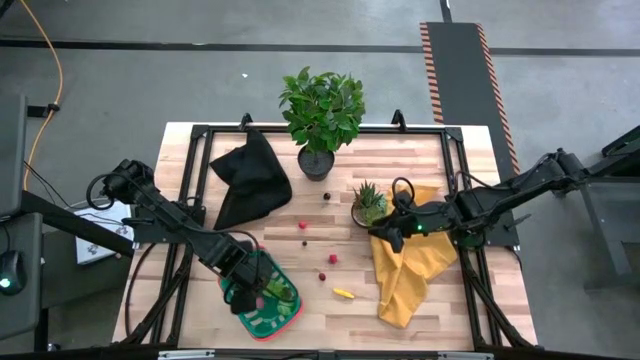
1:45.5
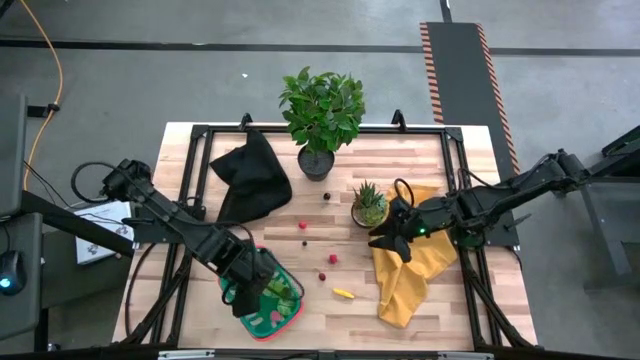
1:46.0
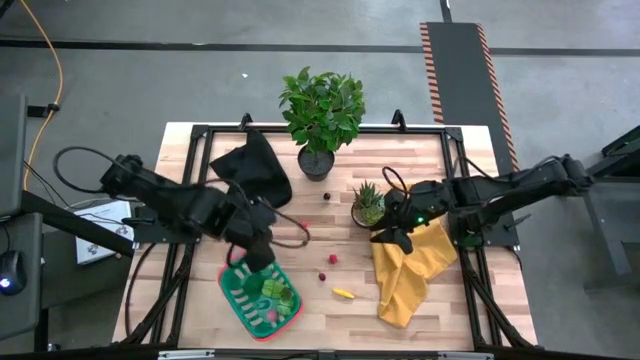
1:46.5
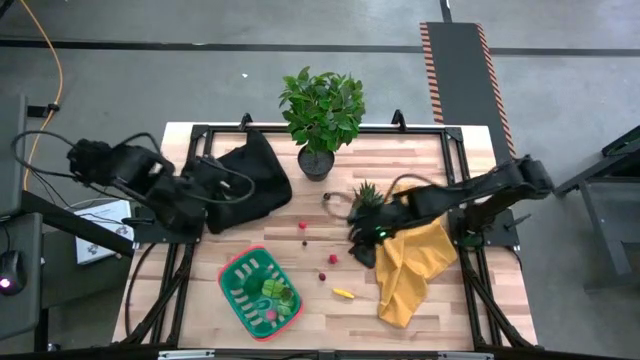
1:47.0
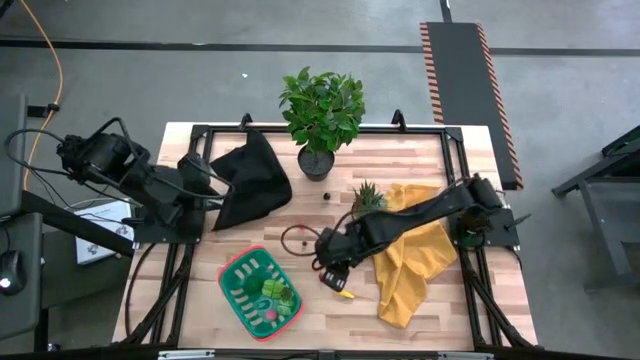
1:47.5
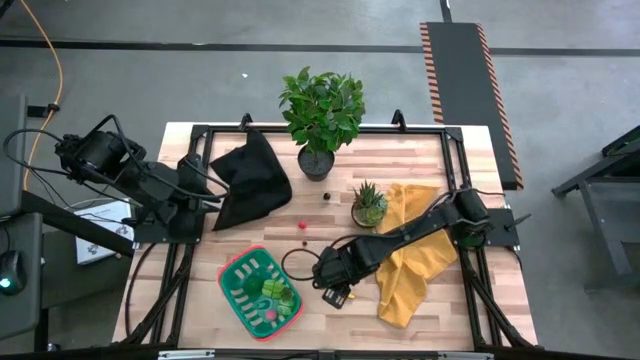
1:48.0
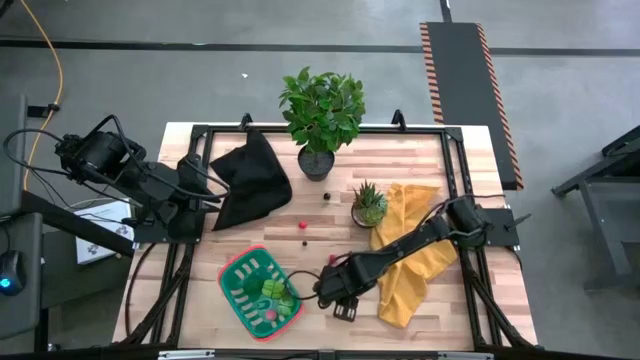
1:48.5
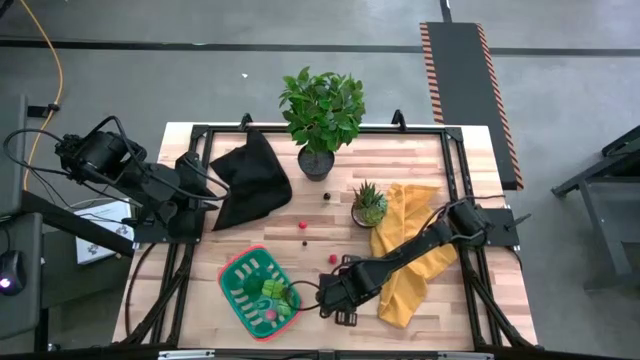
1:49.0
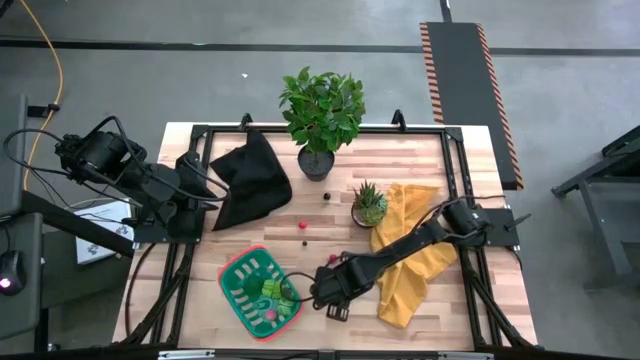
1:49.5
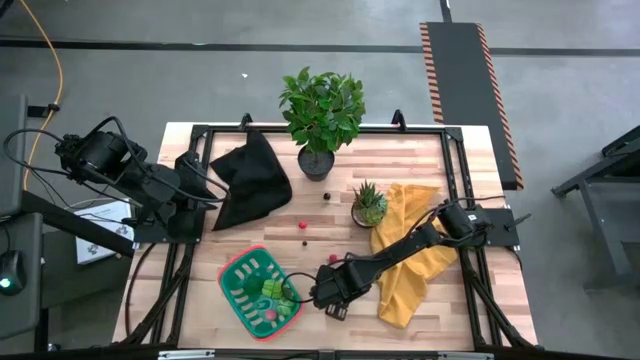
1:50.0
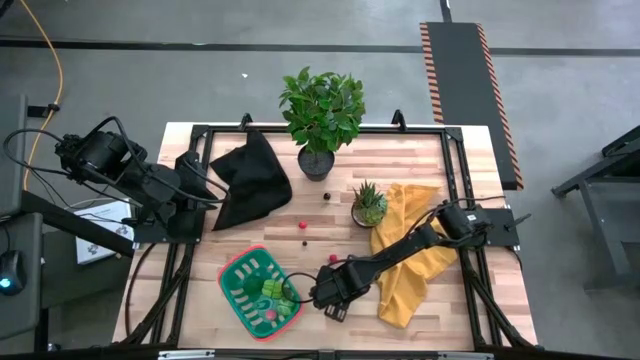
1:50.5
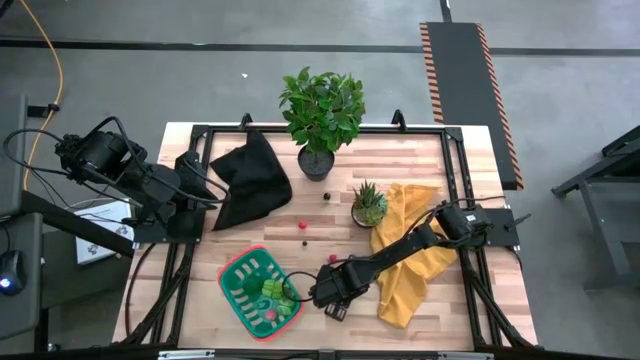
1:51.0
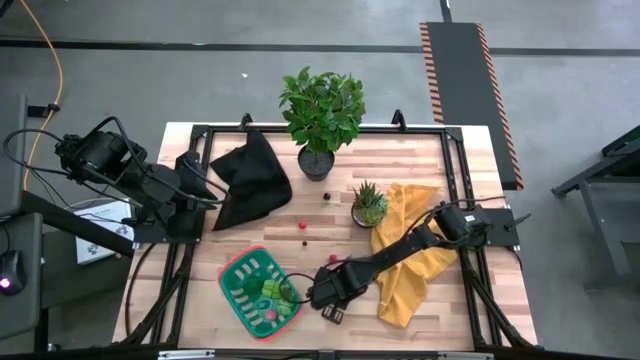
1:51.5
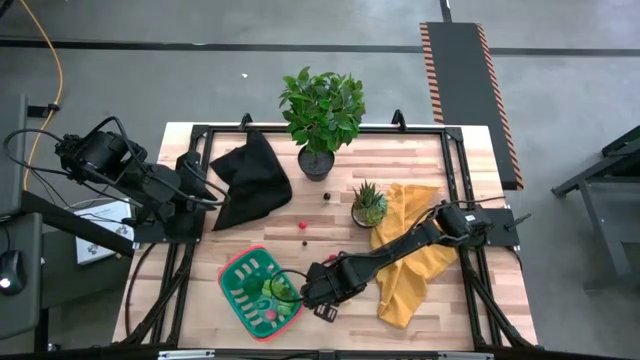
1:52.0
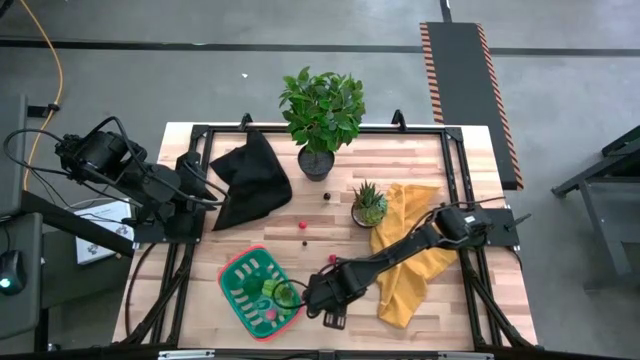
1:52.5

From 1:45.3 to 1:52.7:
Task: Pick and placing Produce into tupperware
Put the yellow corn into the blue basket

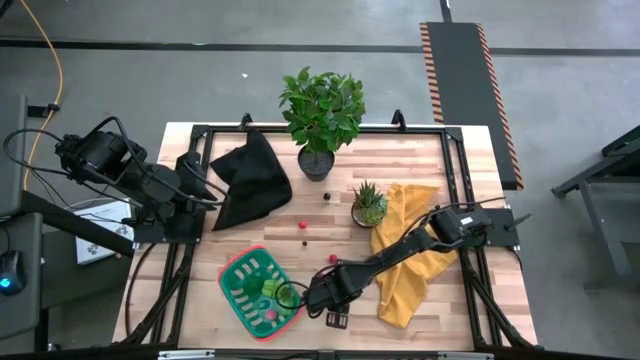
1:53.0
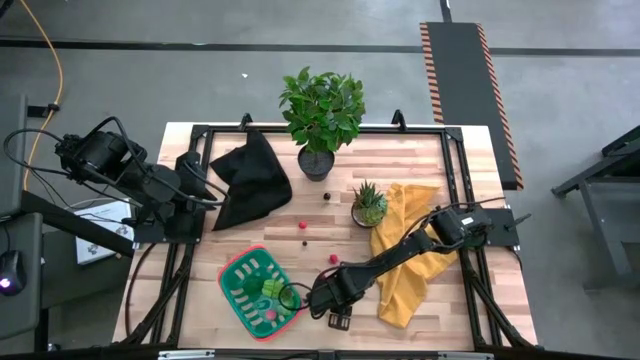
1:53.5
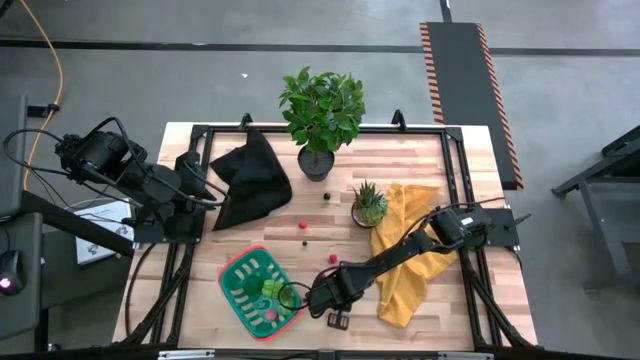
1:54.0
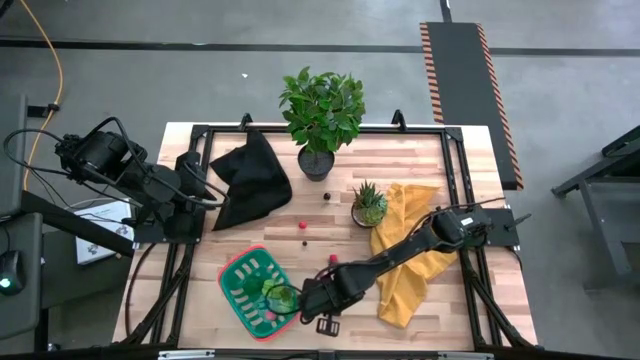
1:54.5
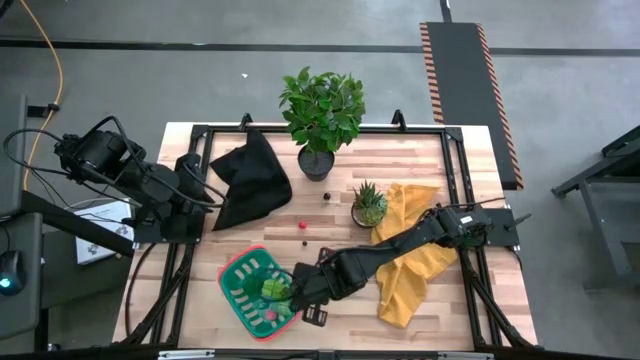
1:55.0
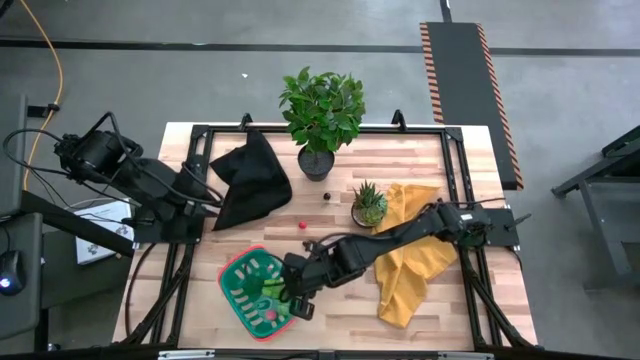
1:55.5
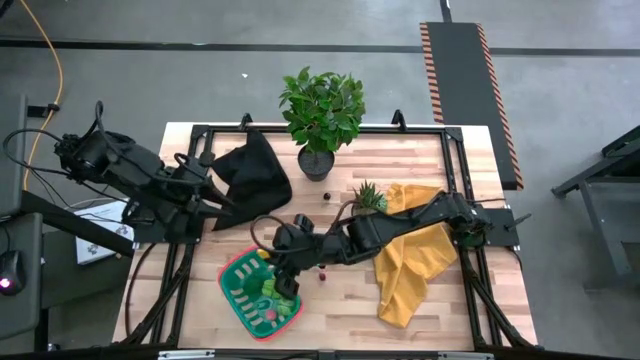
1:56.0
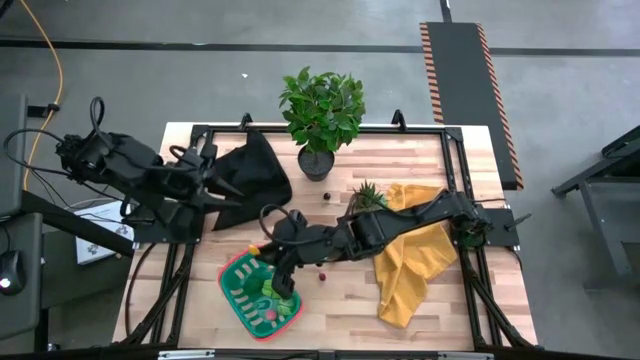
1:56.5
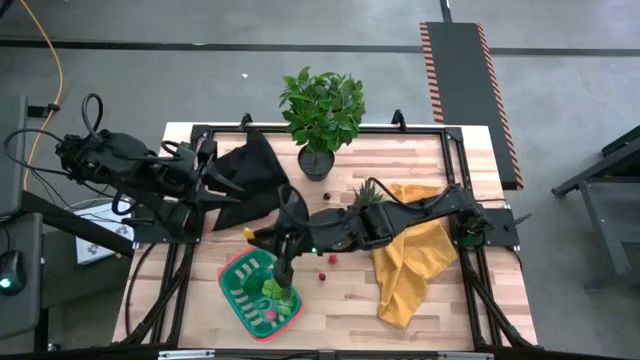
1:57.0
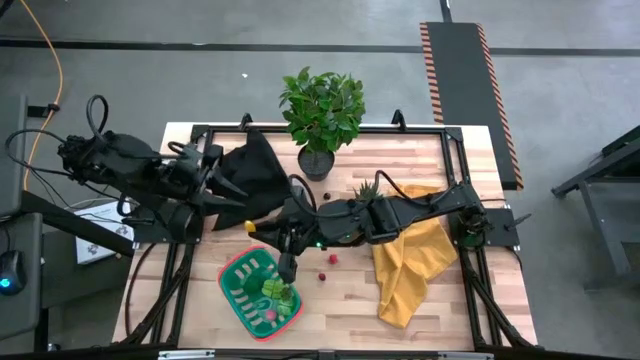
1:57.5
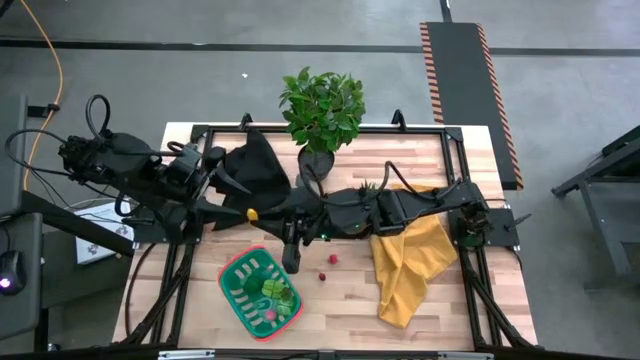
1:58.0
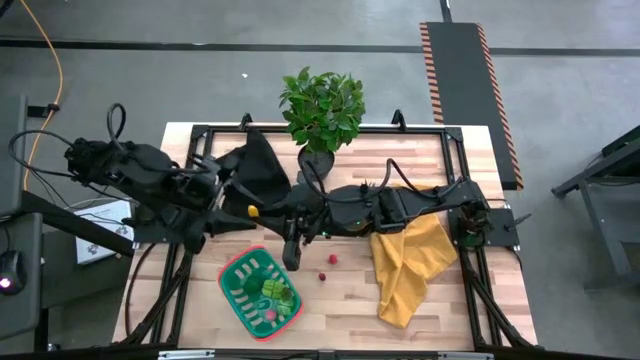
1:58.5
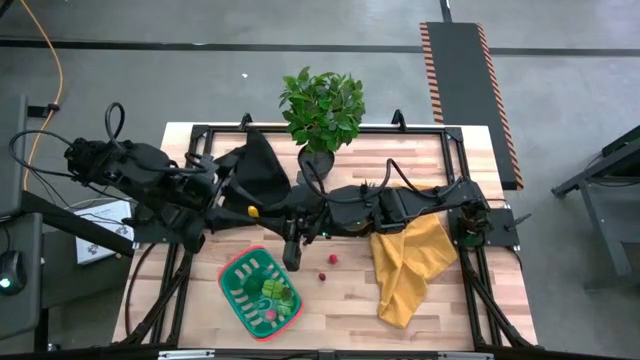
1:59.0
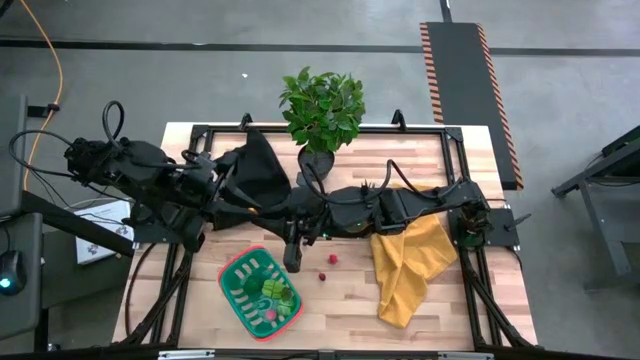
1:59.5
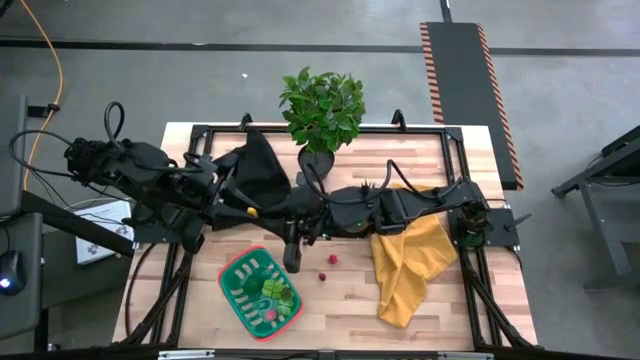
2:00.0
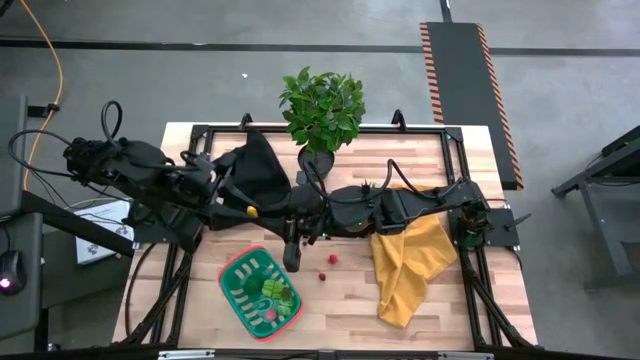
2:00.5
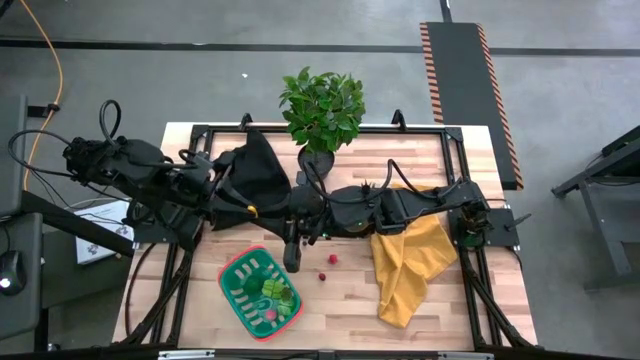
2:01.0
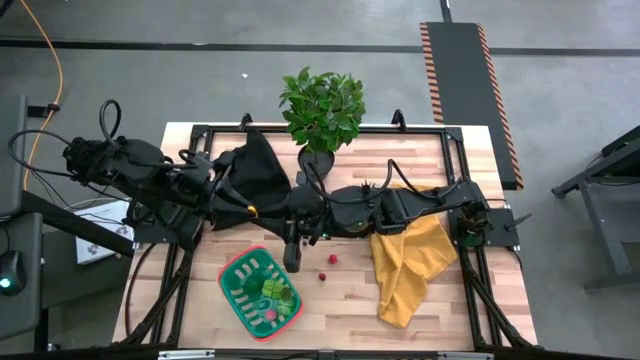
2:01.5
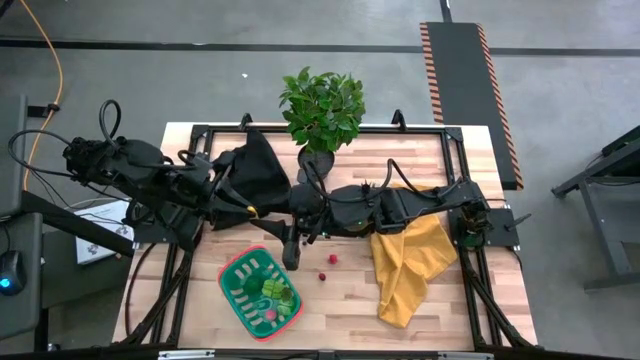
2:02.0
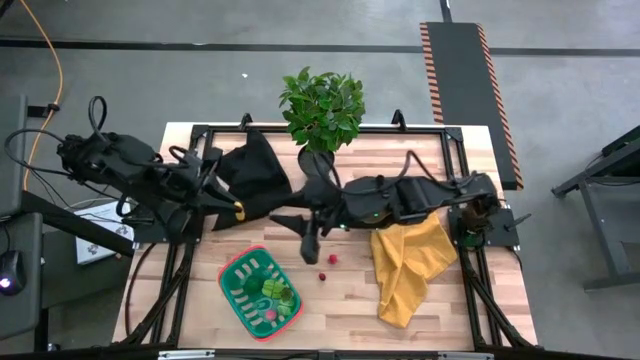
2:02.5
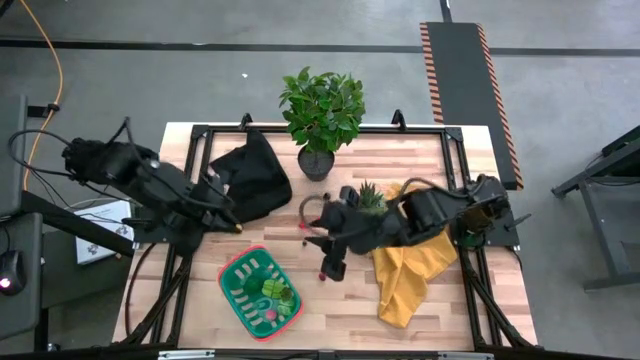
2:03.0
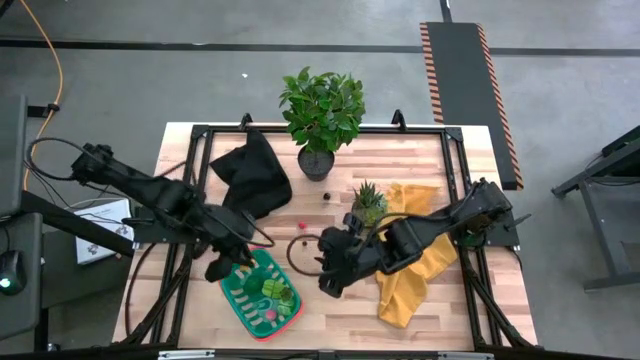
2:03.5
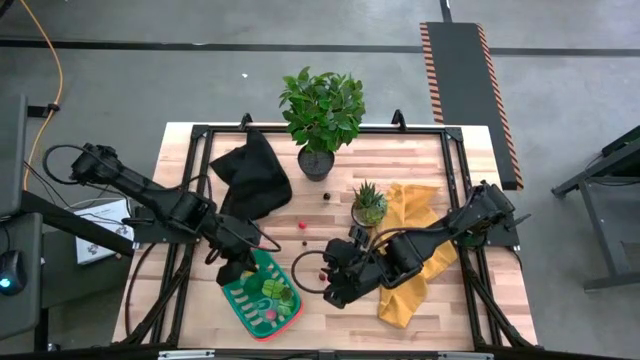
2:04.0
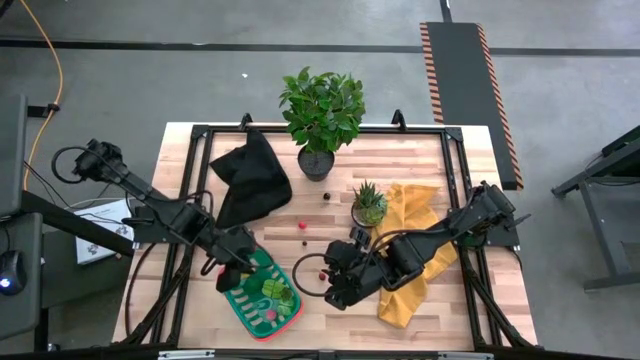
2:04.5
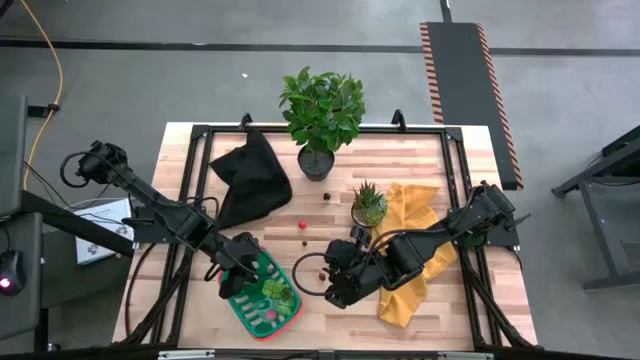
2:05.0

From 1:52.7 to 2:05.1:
Put the yellow corn into the blue basket

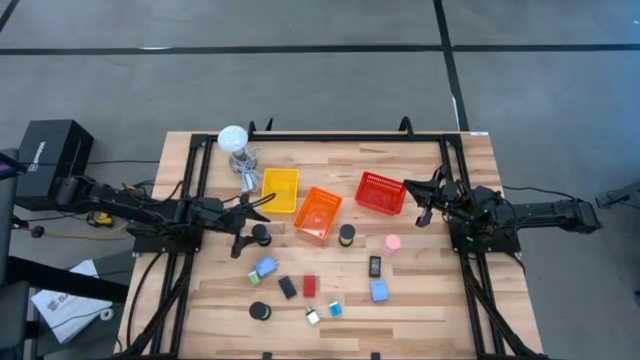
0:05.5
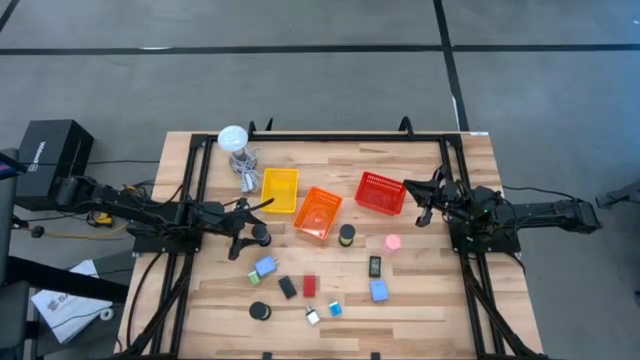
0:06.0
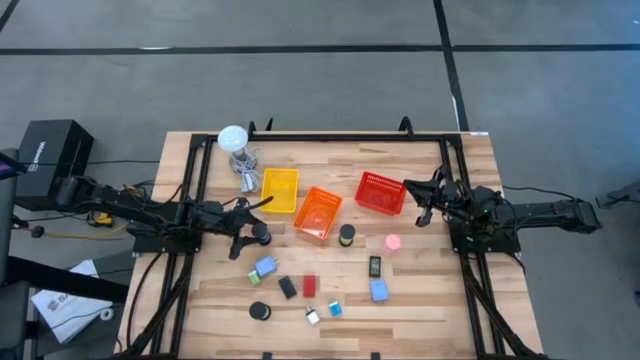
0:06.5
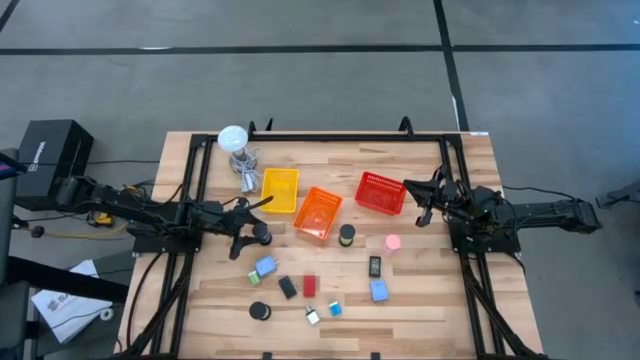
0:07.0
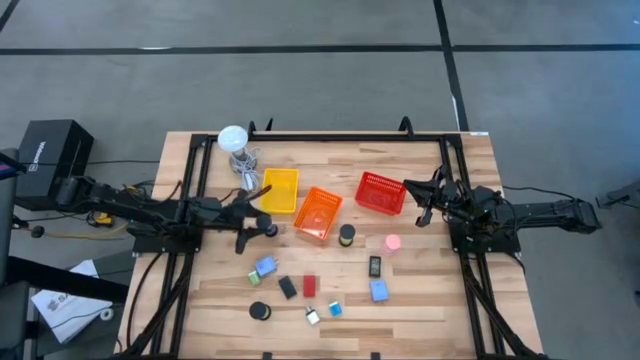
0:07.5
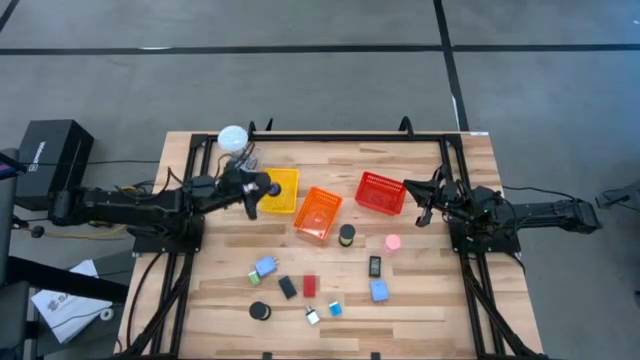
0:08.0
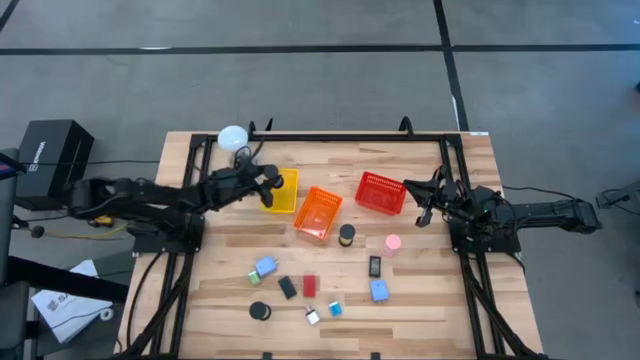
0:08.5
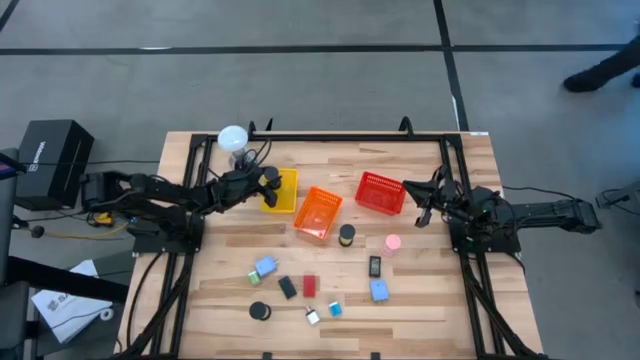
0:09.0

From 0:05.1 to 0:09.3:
Task: Pick & Place Office items
Put the top left sand timer into the yellow bin
